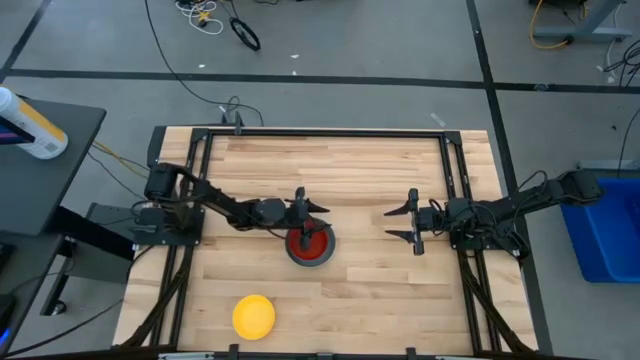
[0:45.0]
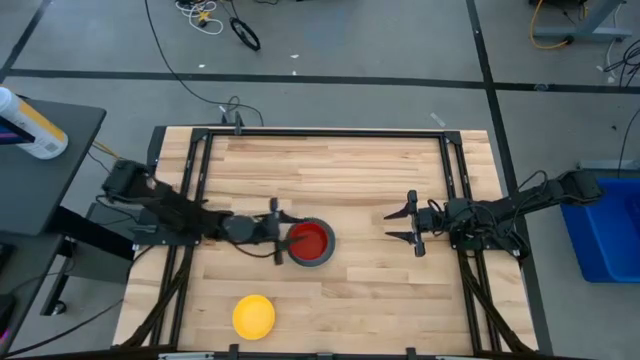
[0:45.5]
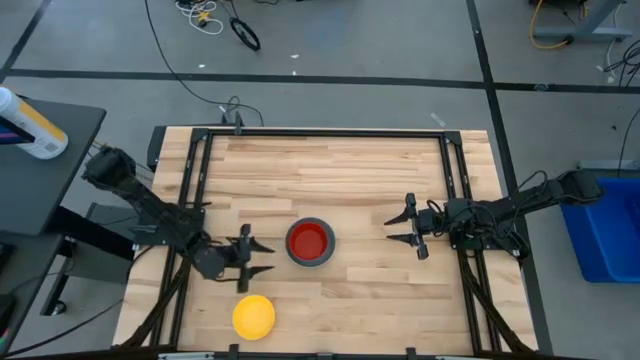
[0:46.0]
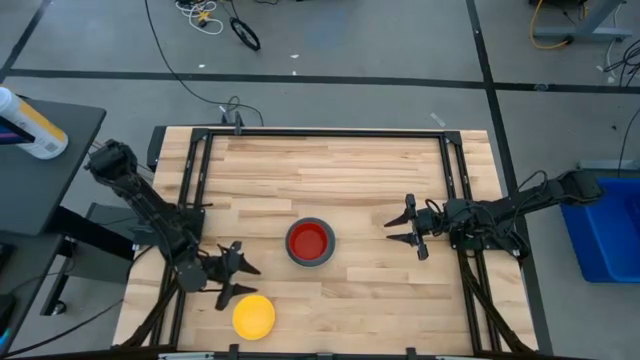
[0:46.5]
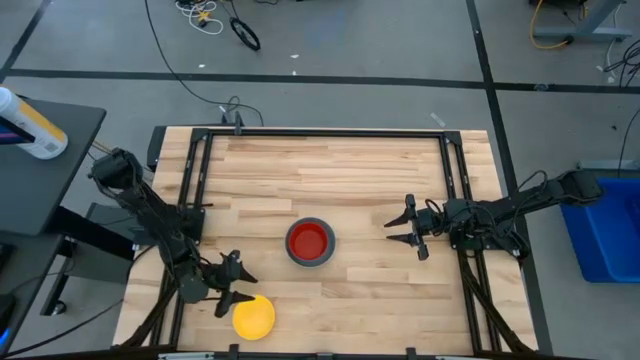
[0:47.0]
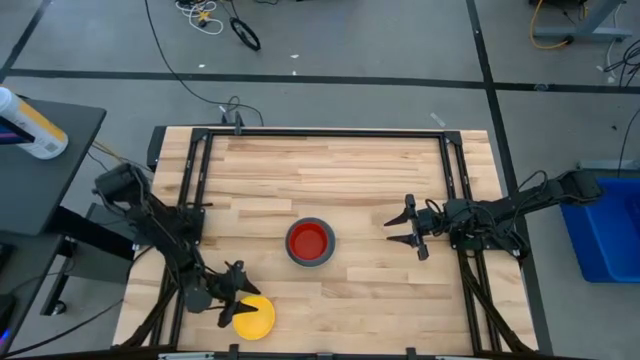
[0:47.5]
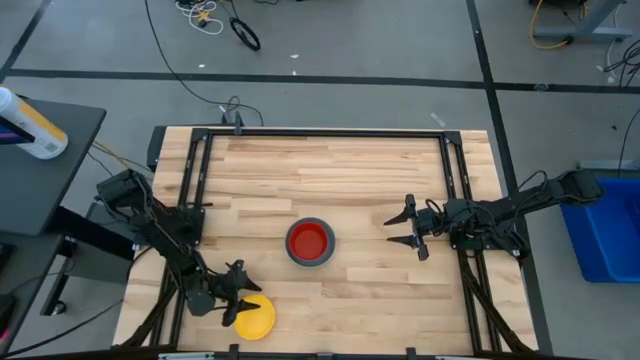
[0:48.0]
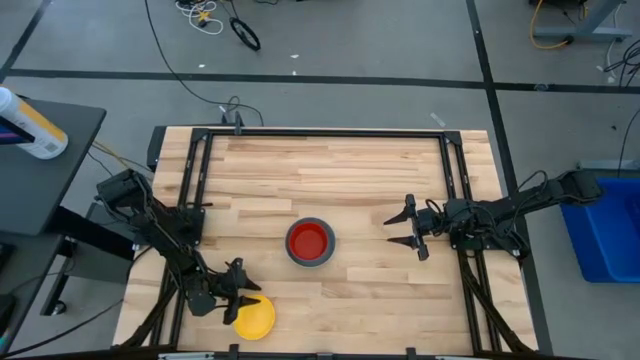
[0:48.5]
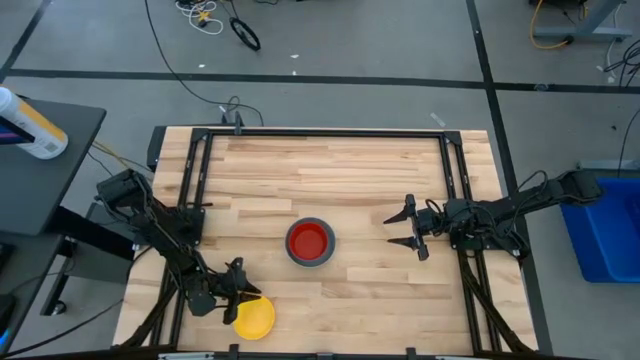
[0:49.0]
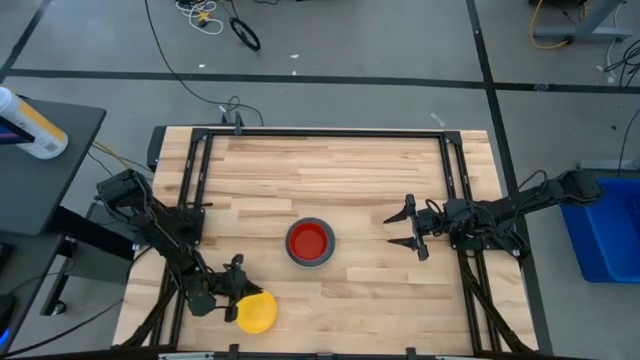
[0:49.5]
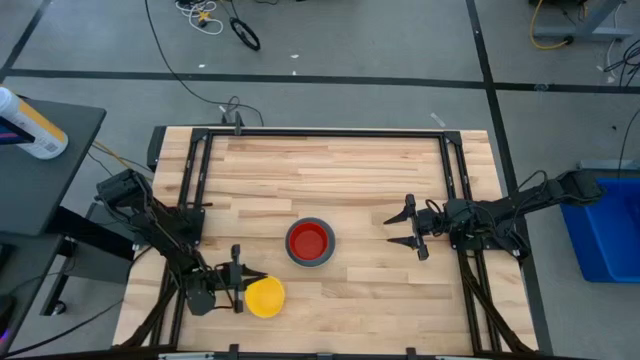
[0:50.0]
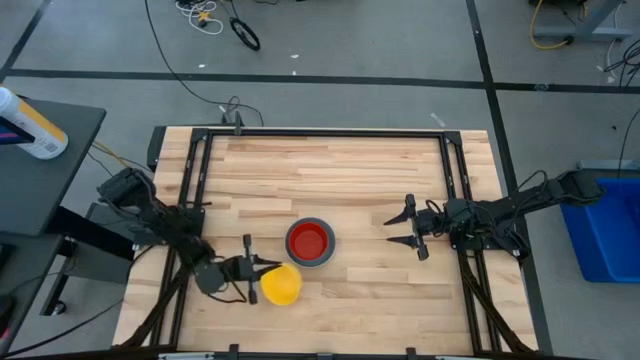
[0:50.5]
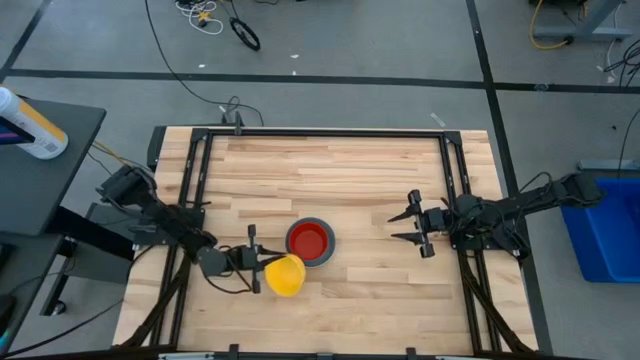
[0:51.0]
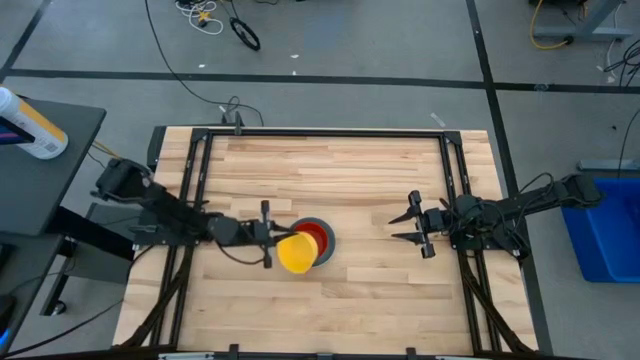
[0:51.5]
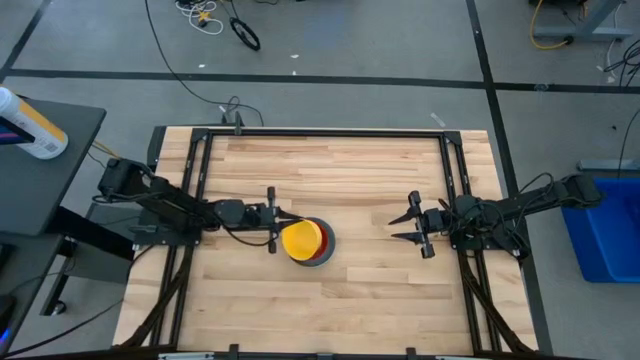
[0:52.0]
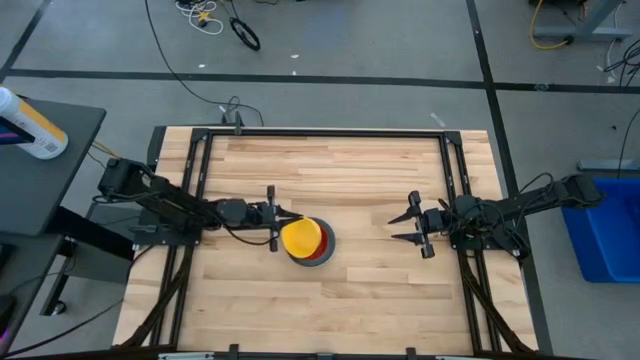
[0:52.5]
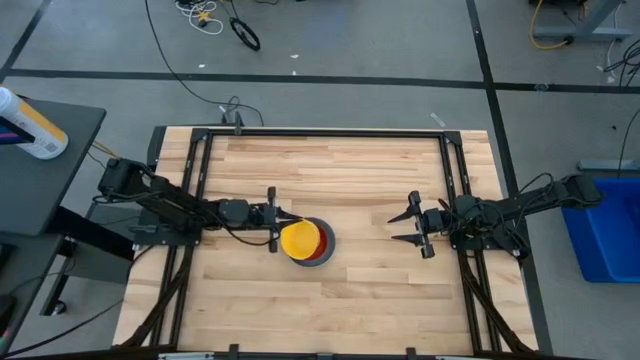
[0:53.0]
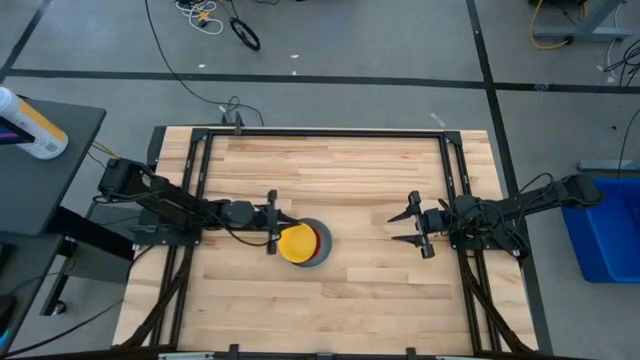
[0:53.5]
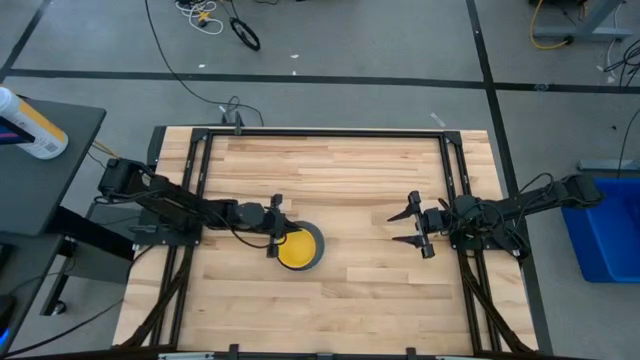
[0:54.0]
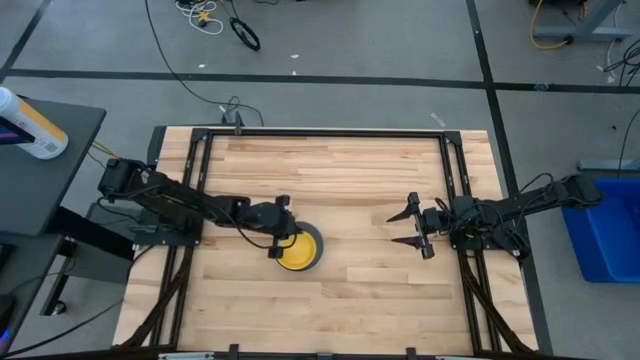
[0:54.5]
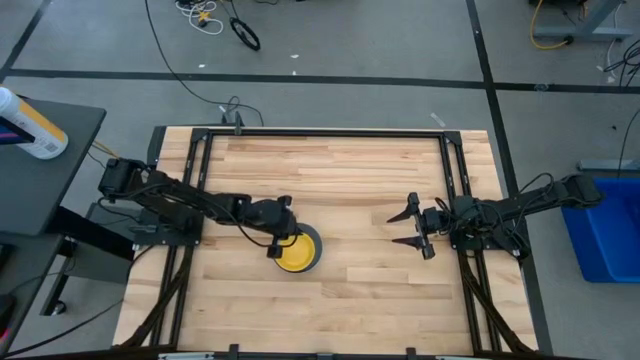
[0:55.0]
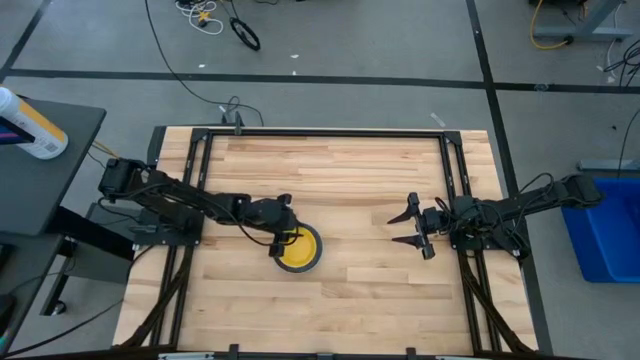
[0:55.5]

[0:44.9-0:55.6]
Stack the yellow bowl on the red bowl

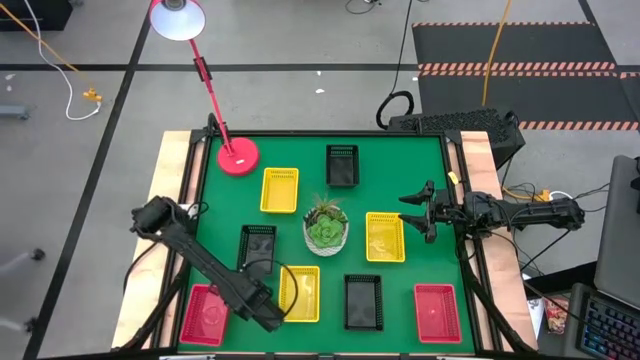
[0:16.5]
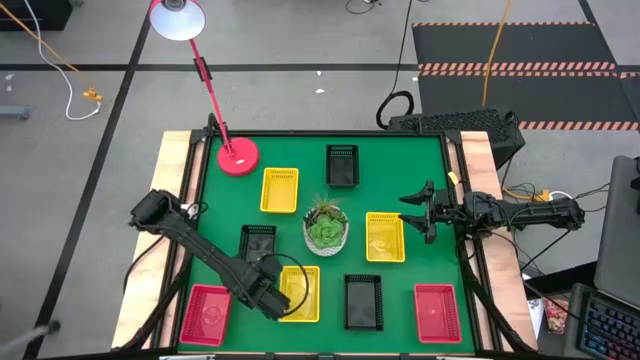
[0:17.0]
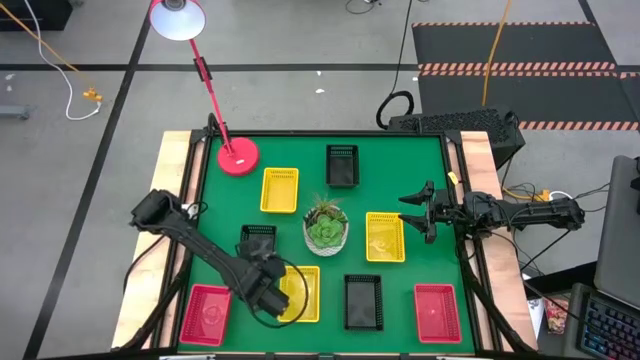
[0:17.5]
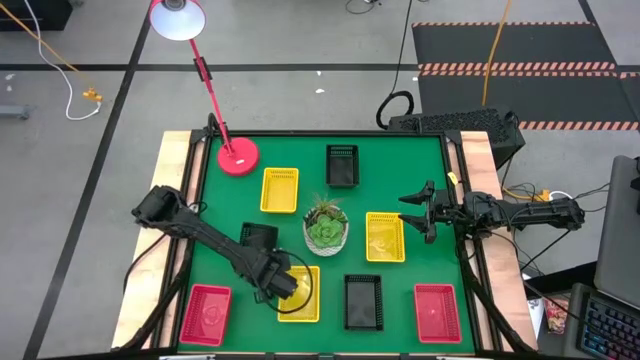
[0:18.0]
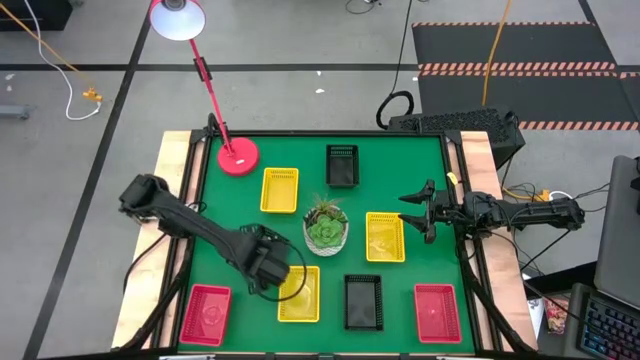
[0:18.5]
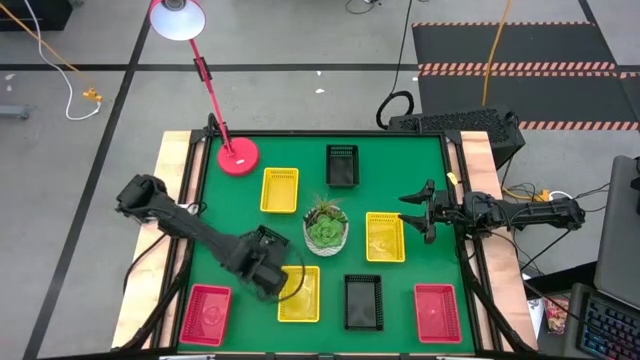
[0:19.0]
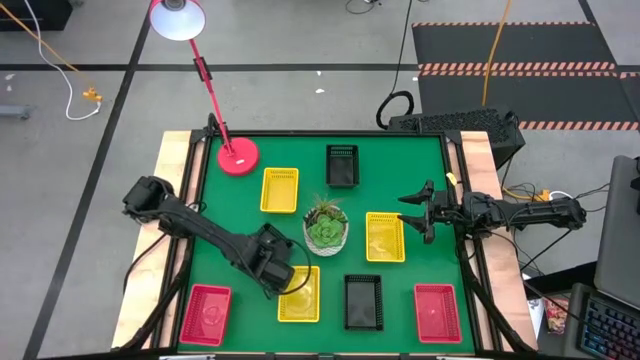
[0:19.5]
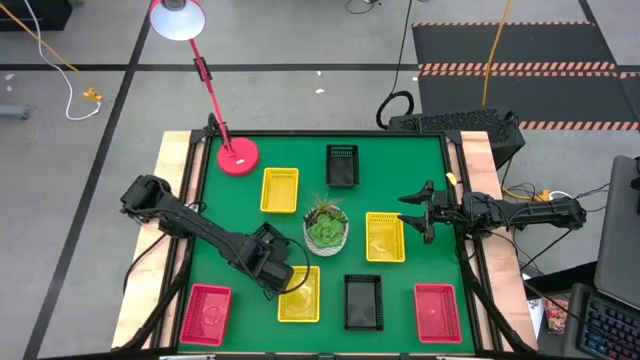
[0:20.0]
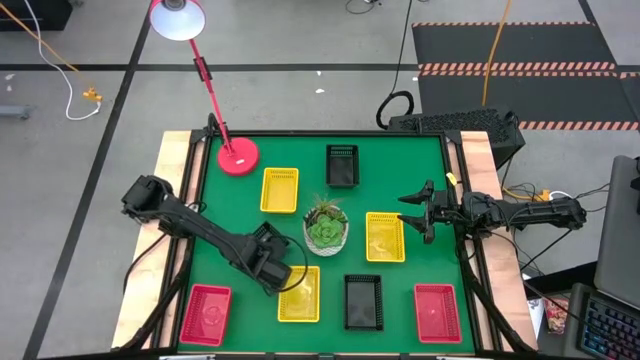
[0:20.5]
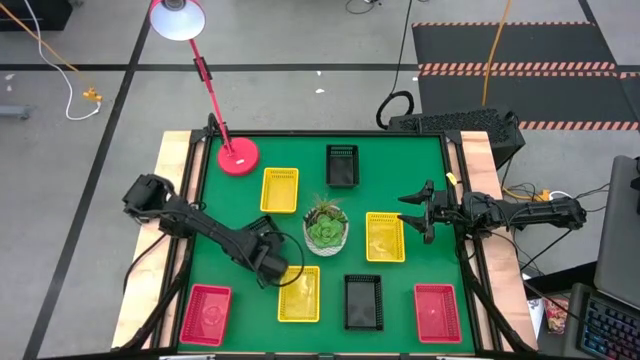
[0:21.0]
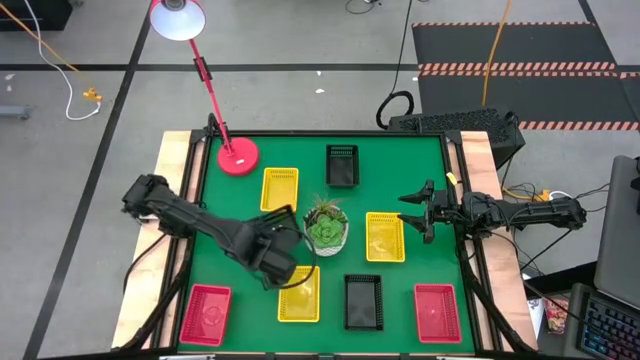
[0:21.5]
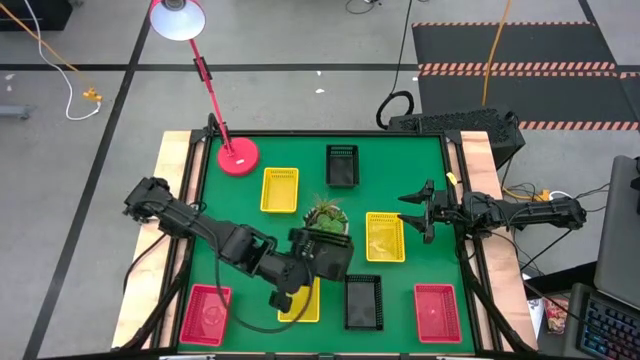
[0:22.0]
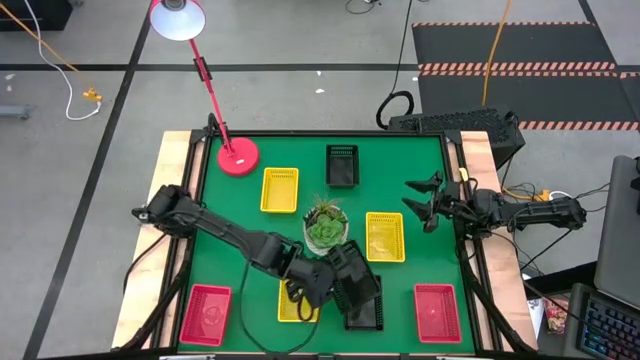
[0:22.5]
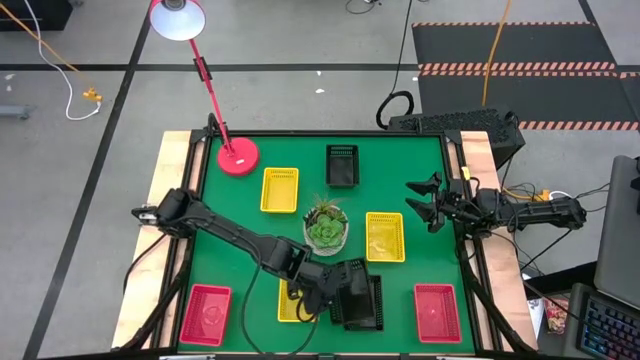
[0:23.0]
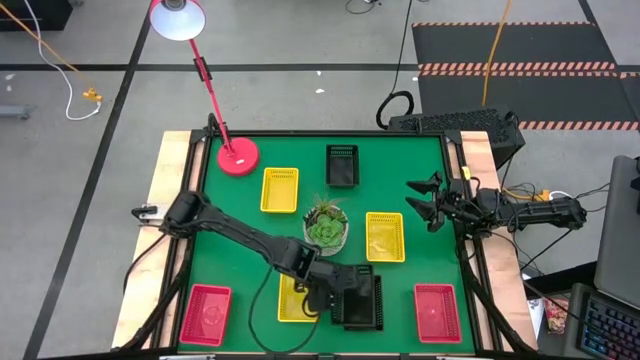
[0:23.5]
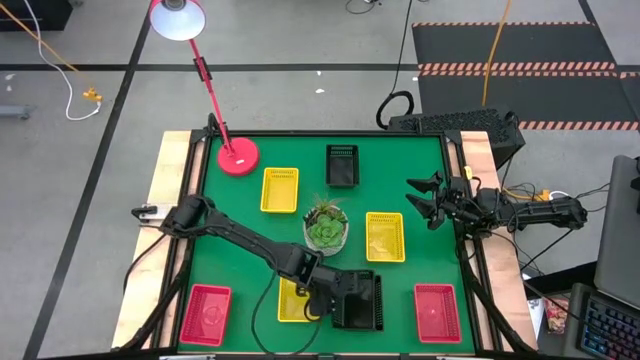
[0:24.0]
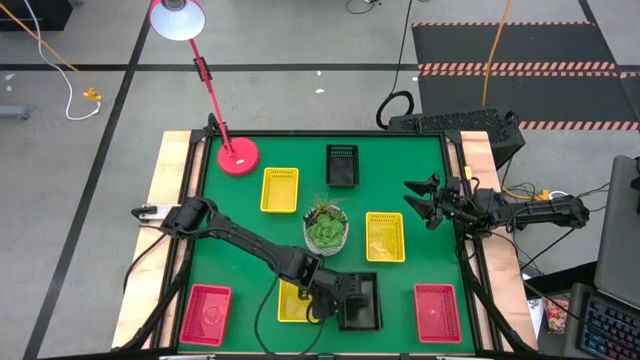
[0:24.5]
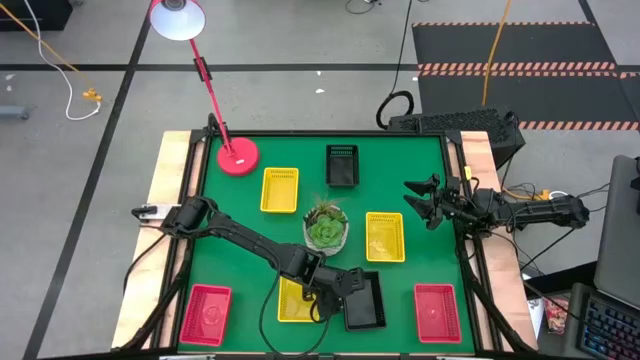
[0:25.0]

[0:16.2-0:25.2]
Stack the middle black bin on top of the bottom black bin
